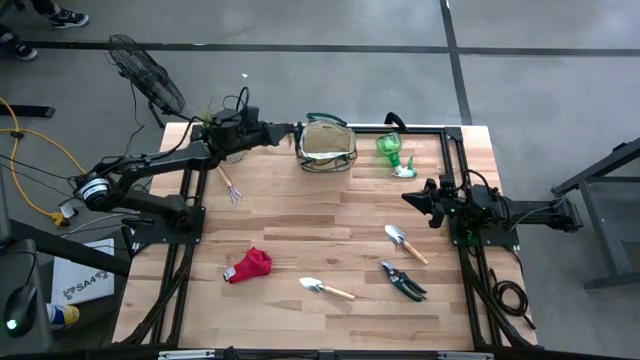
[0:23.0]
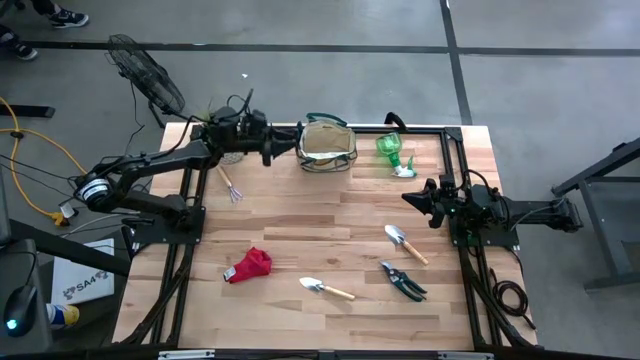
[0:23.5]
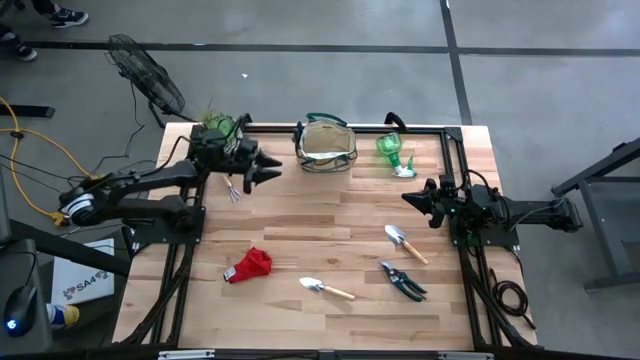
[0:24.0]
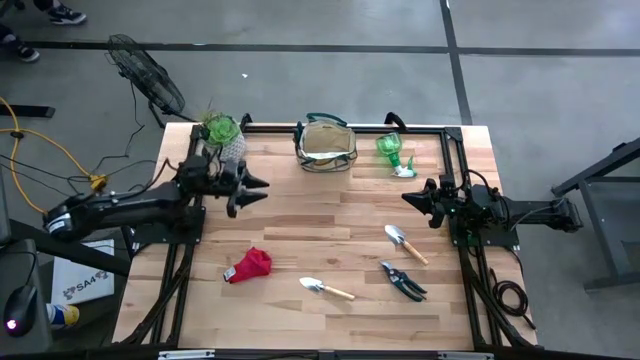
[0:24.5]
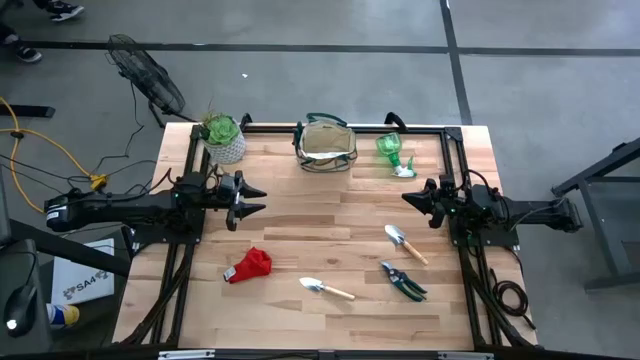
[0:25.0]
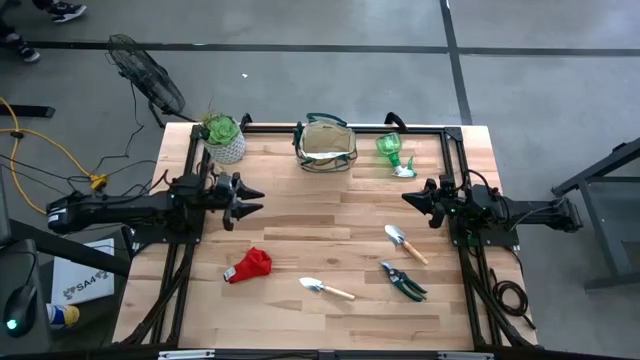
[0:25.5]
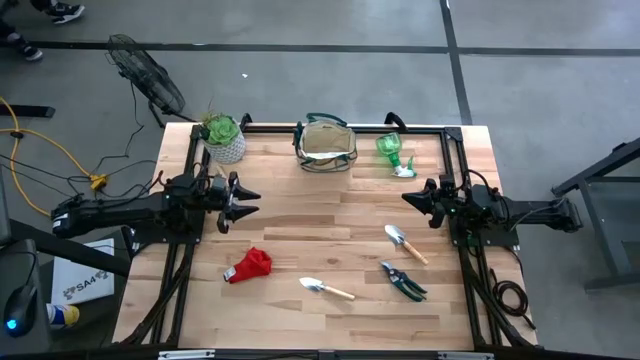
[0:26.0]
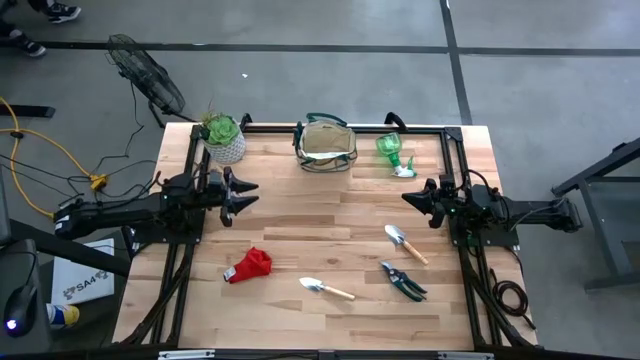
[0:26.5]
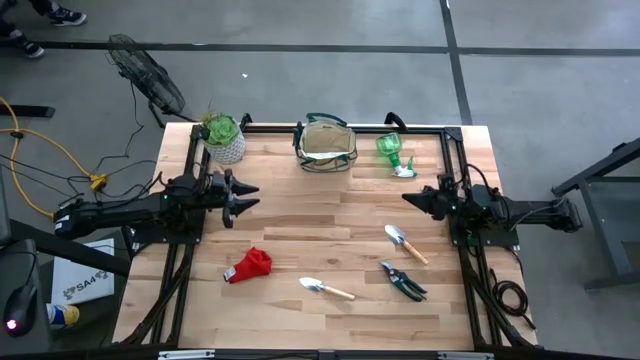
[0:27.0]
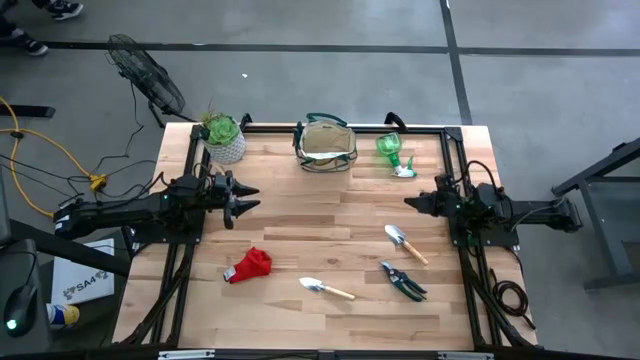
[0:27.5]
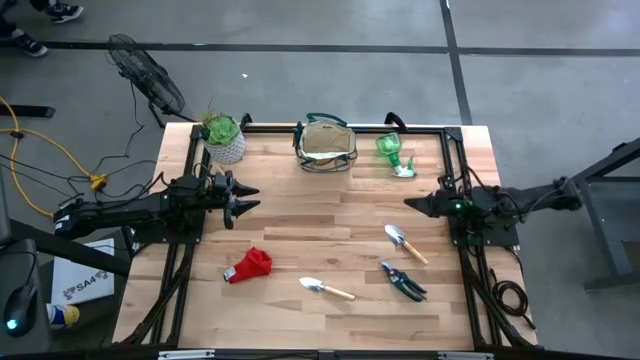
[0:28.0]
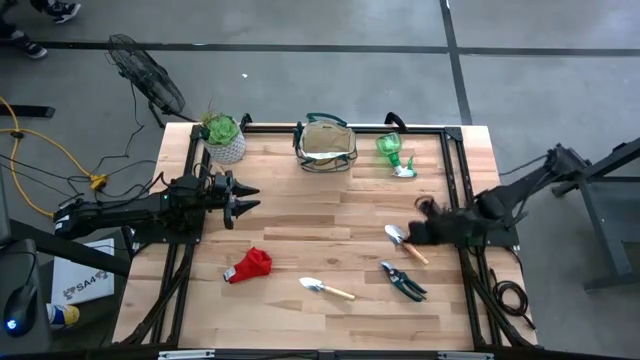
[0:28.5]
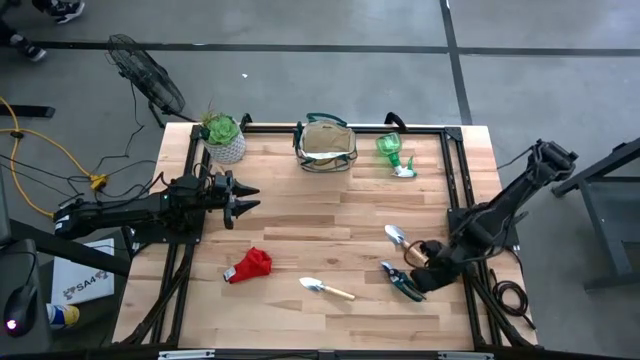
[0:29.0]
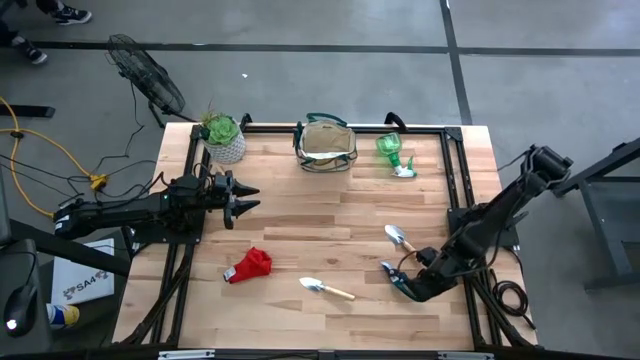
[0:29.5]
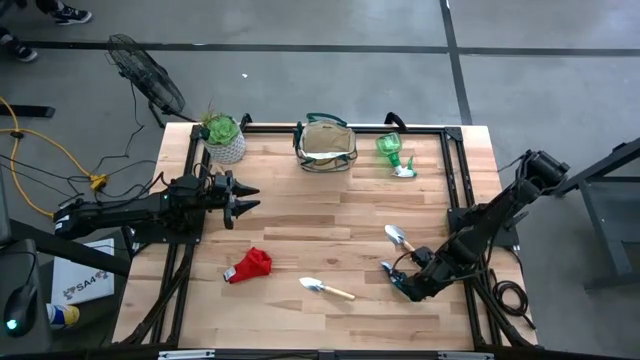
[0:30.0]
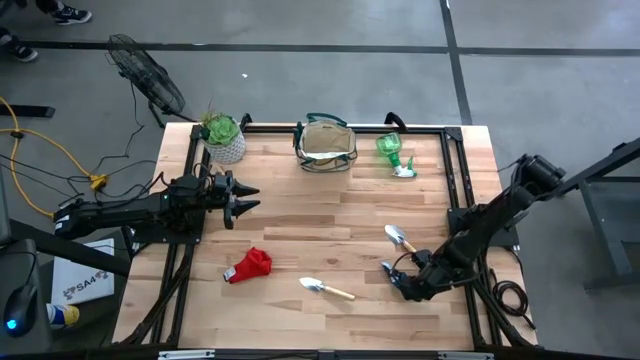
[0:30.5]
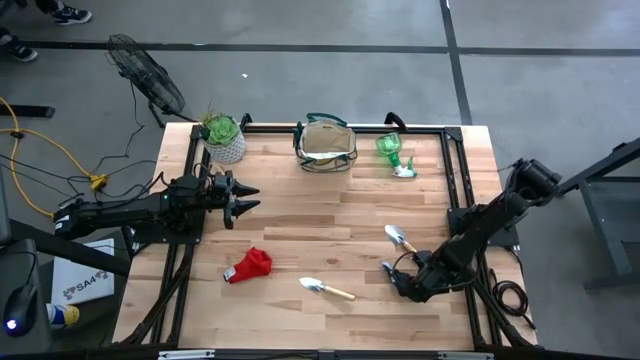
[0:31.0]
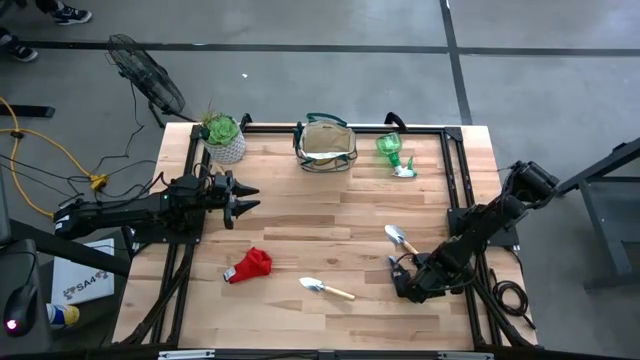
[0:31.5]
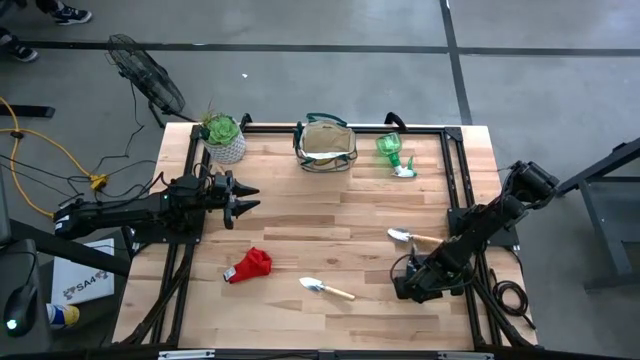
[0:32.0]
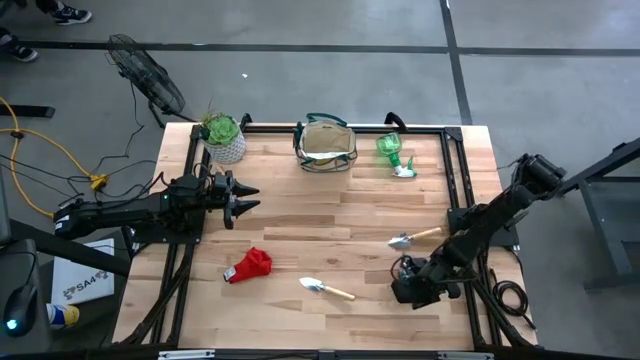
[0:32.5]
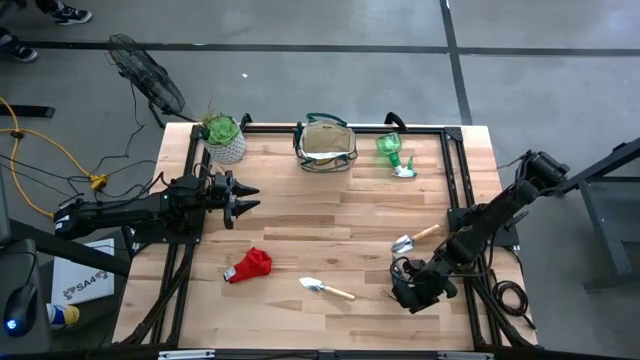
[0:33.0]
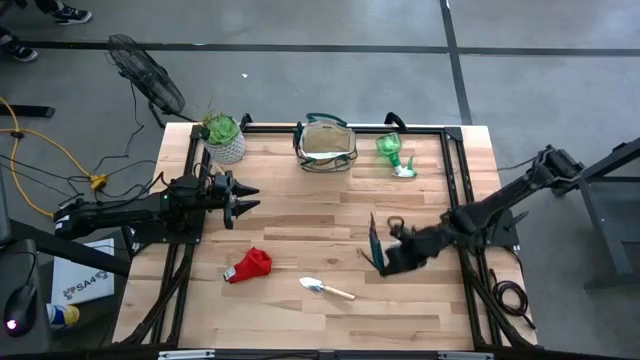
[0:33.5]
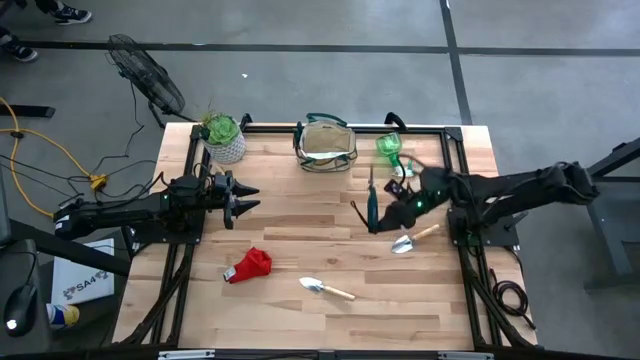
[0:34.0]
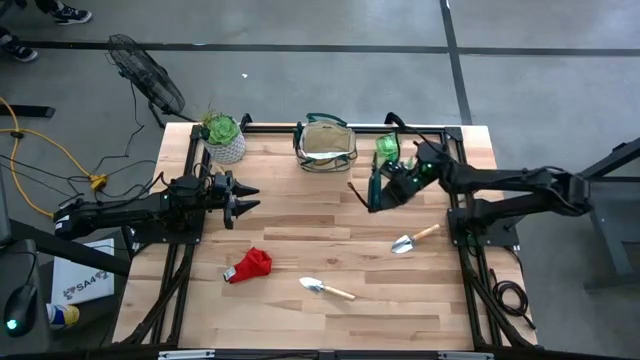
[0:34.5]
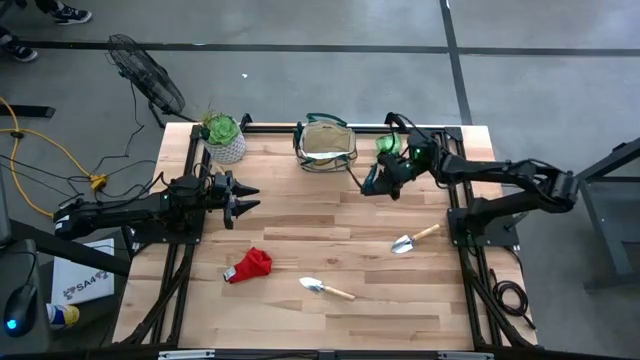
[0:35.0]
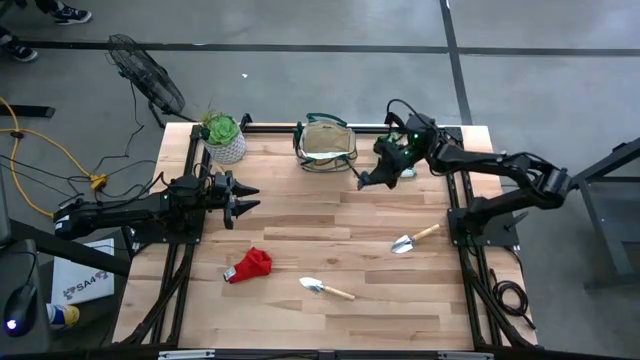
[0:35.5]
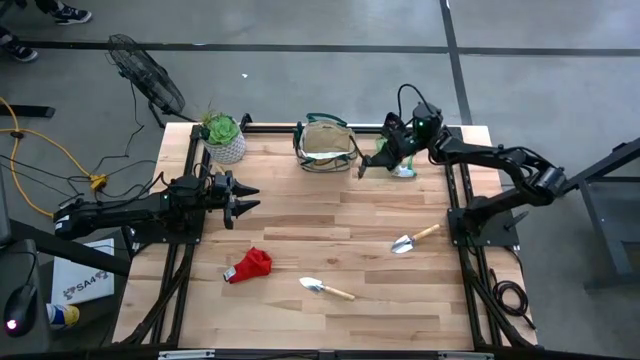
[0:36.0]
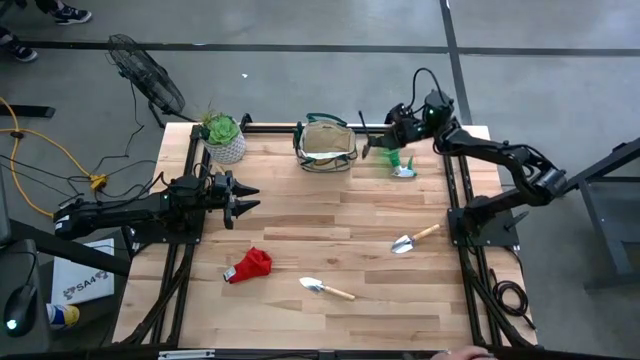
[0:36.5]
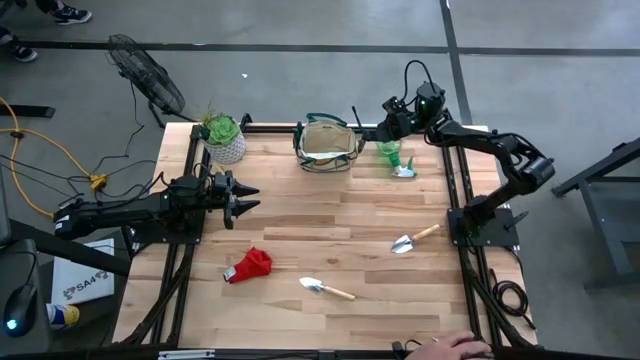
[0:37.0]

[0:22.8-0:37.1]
Task: Pick & Place Garden tools in Gardening bag
Put the shear scissors into the gardening bag
